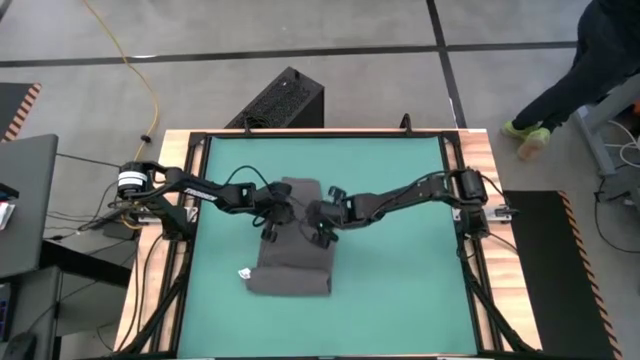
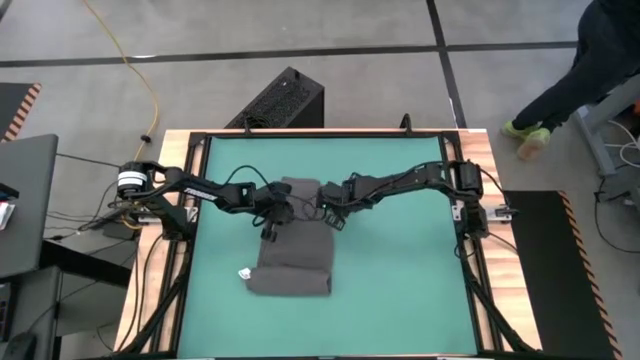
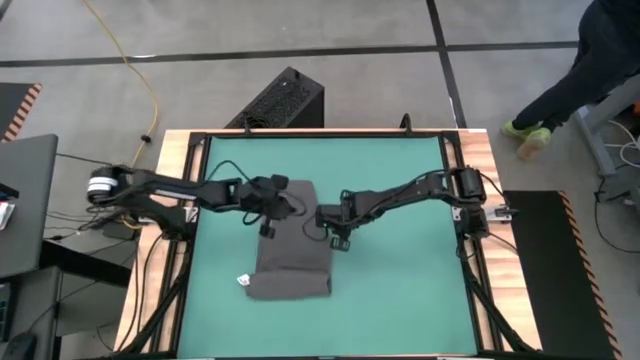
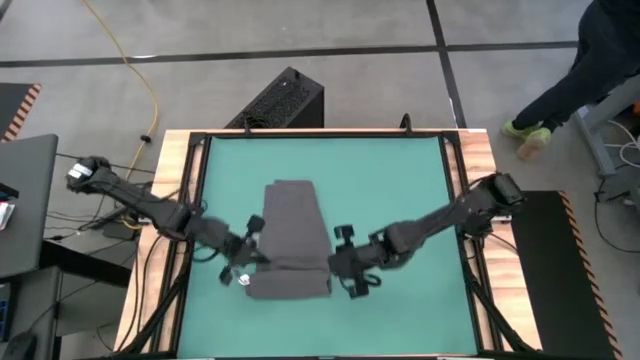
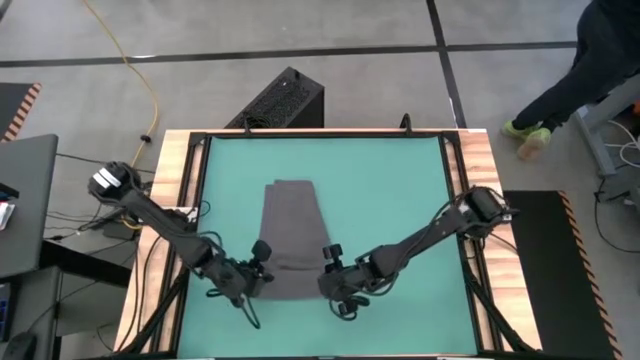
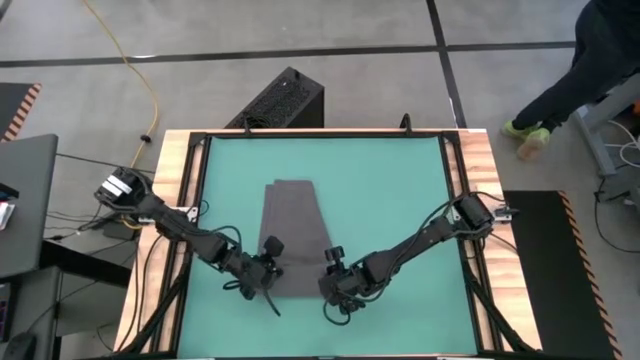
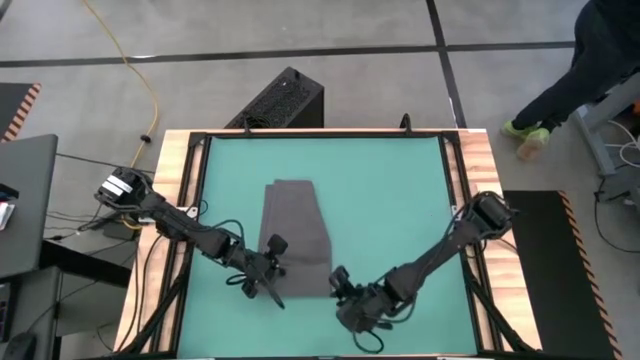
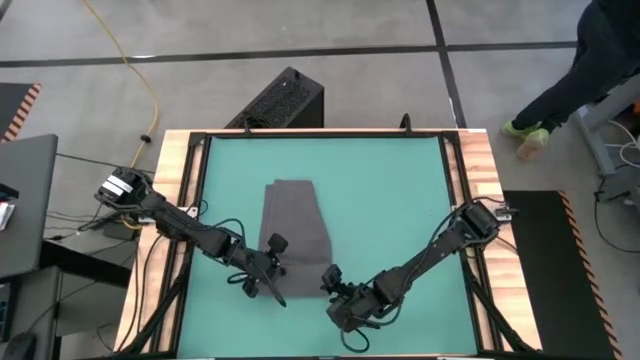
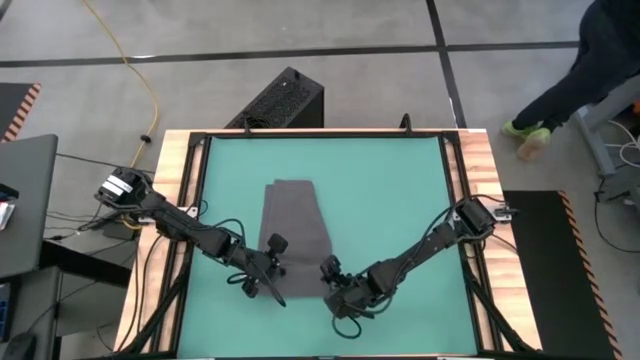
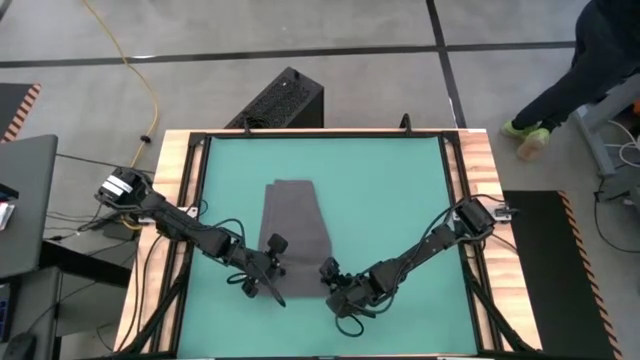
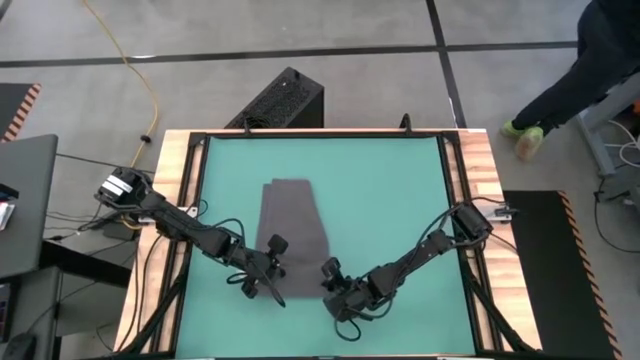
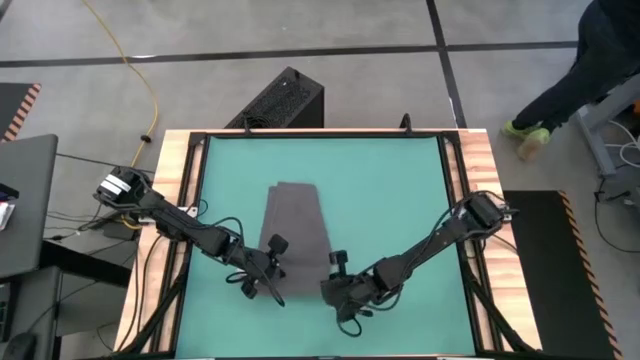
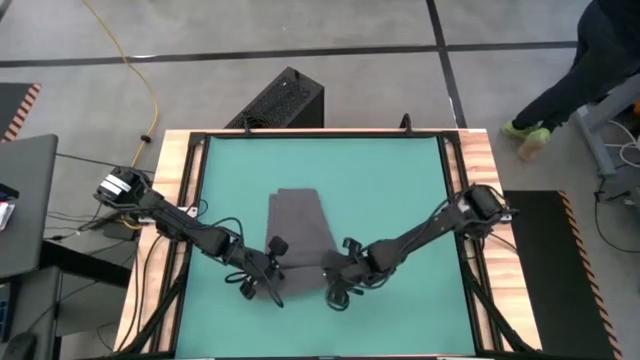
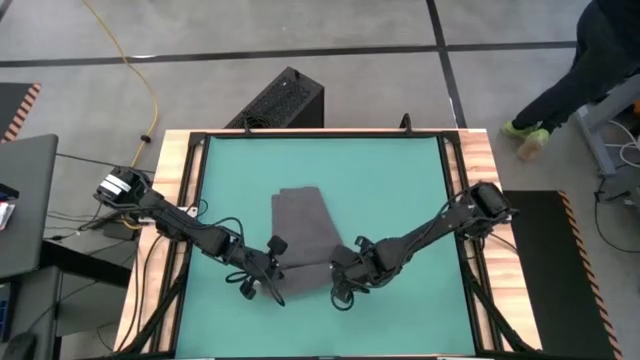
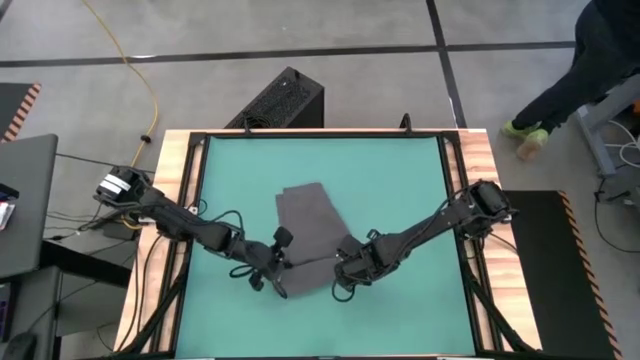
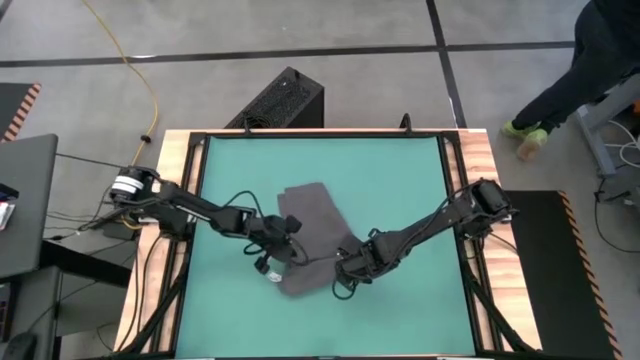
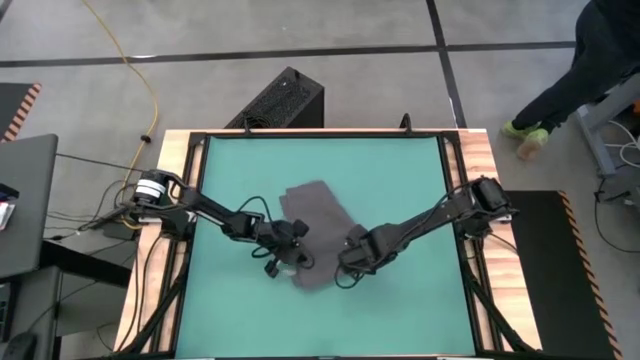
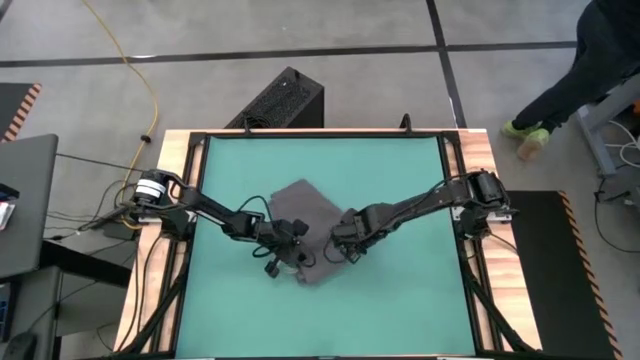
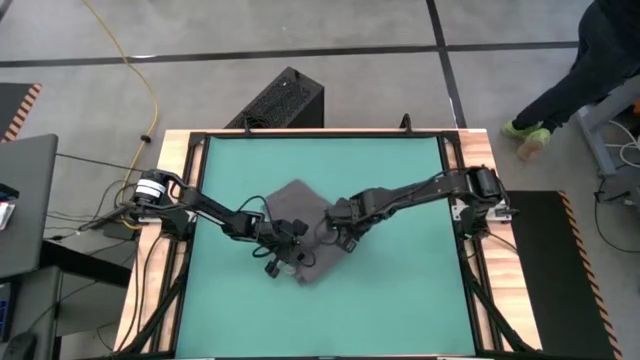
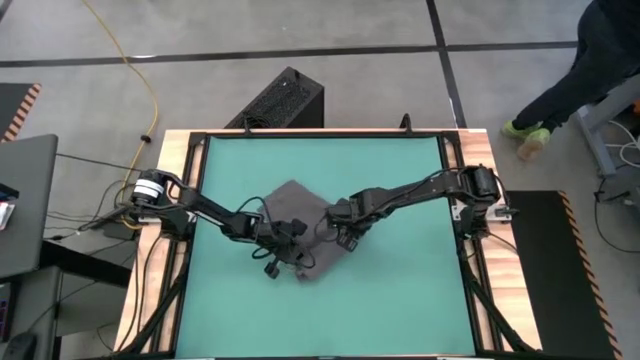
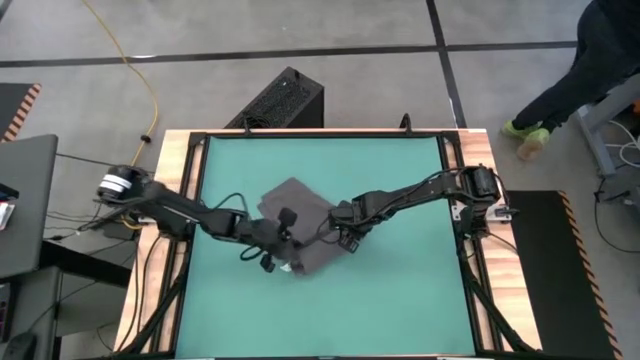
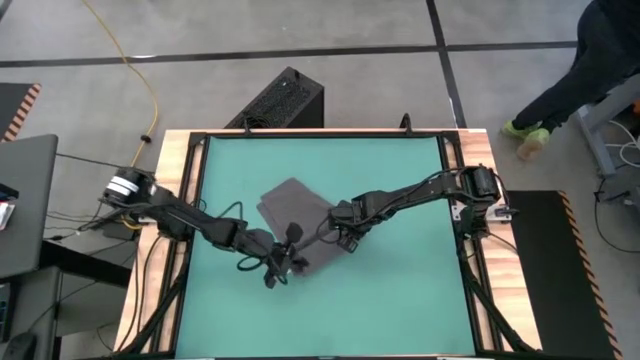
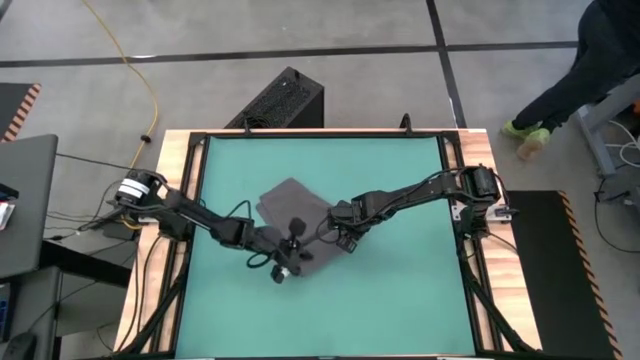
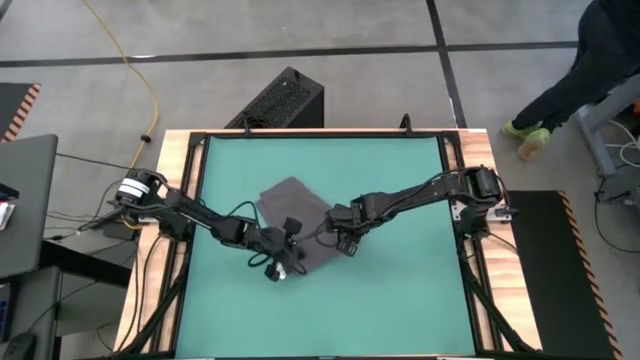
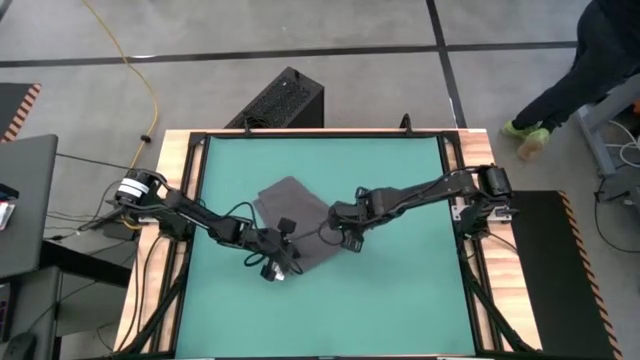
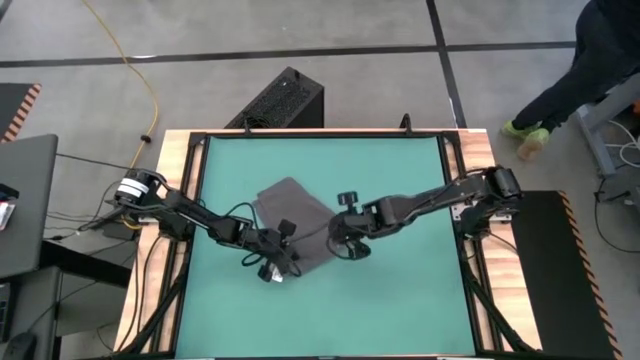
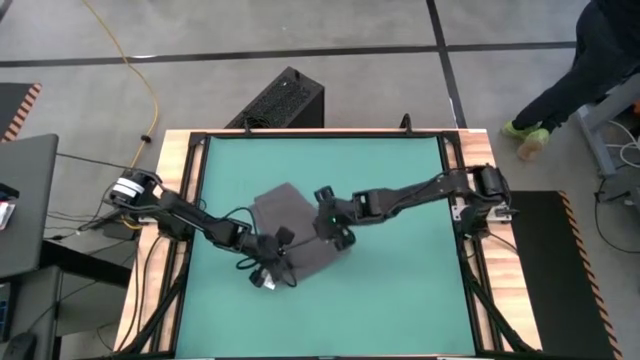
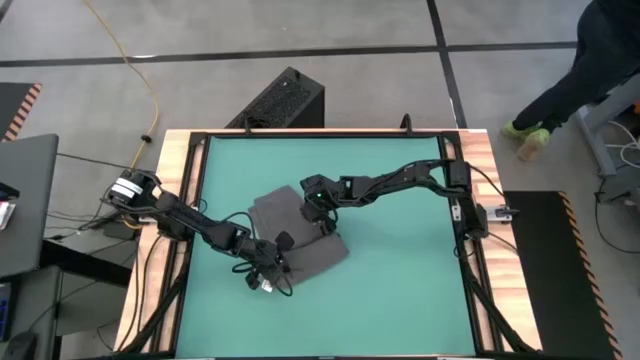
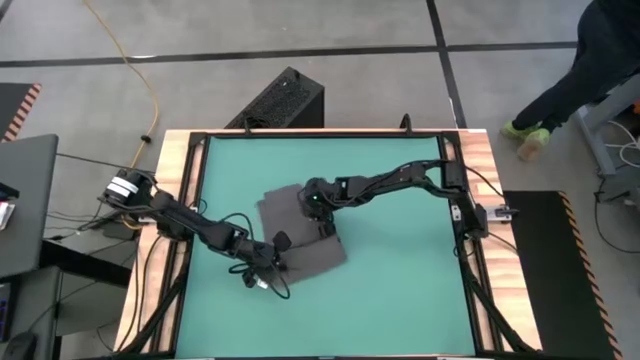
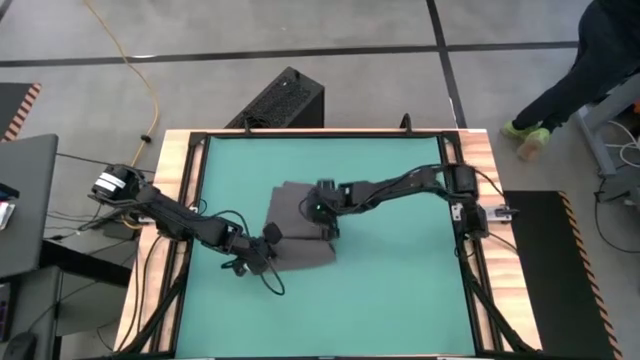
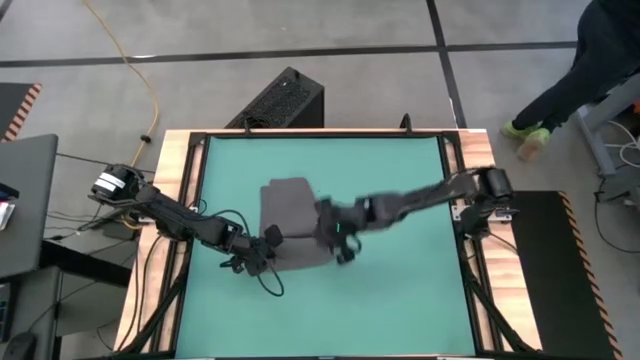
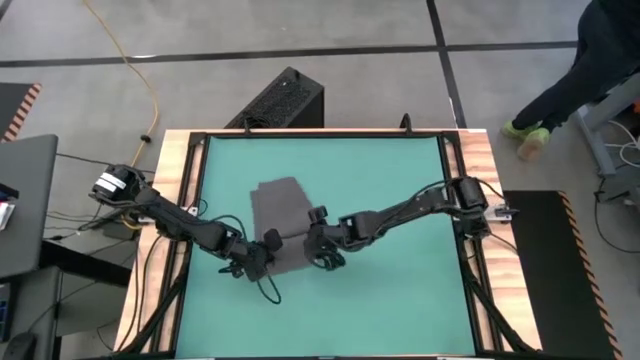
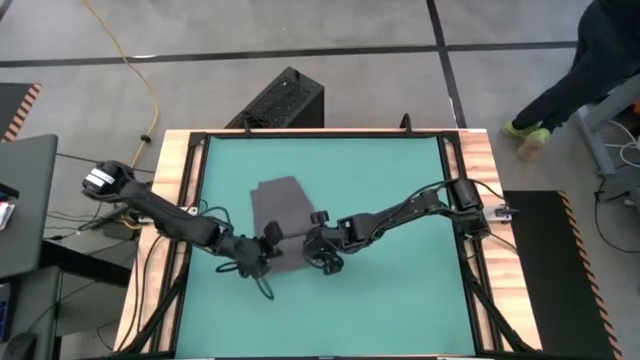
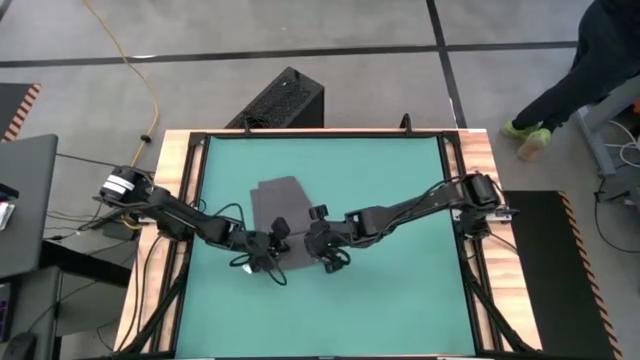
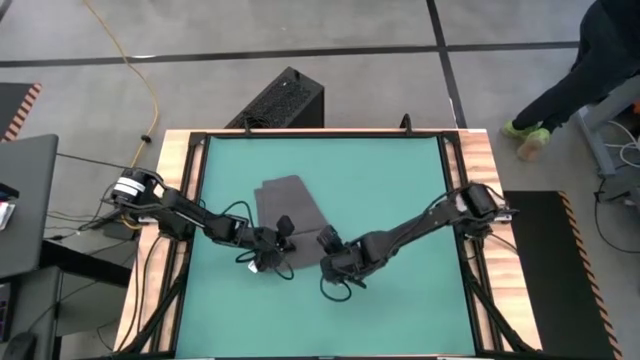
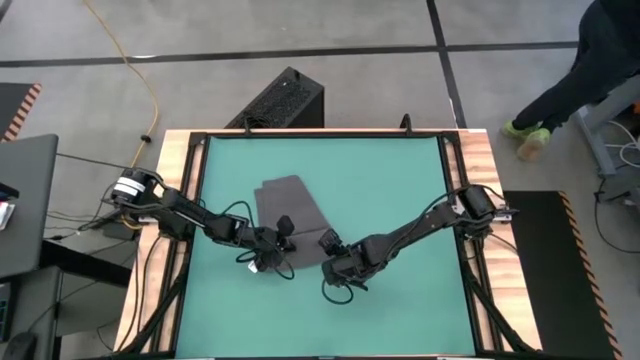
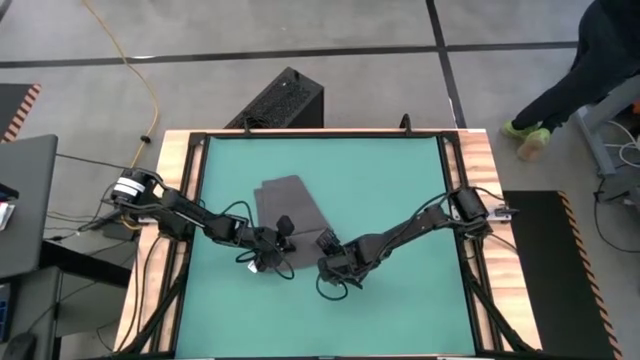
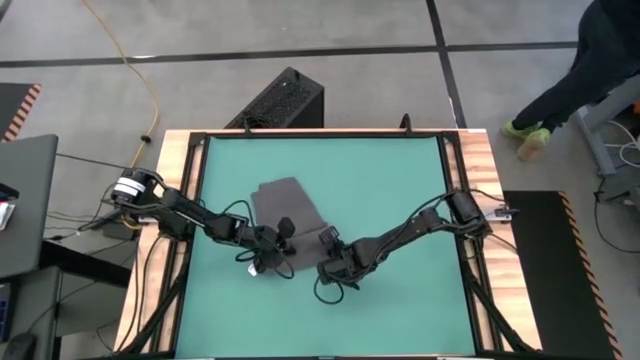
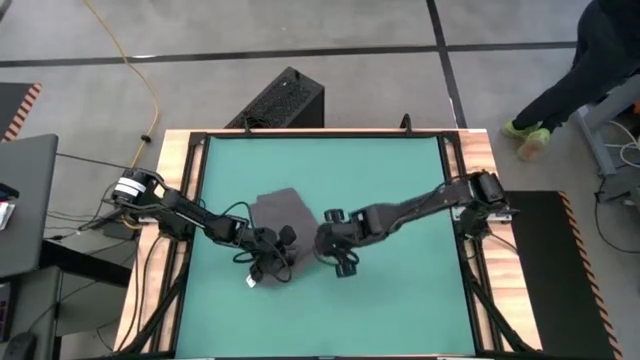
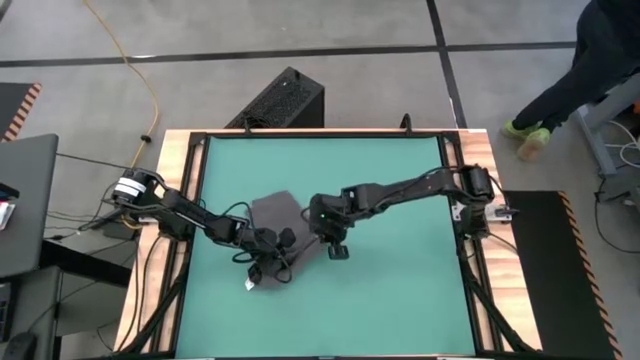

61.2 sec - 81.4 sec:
Task: Roll towel into tight, uniform cylinder
Roll the gray towel

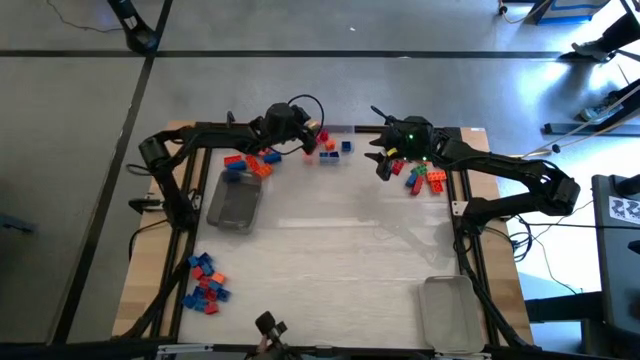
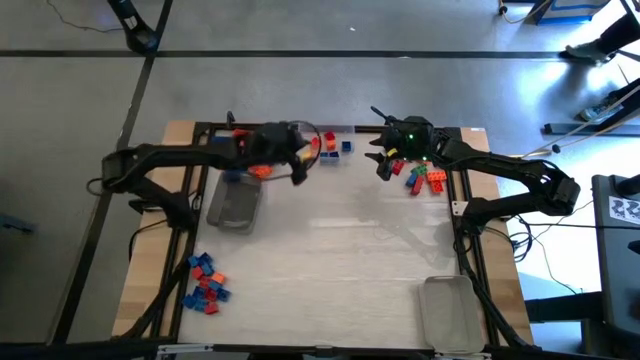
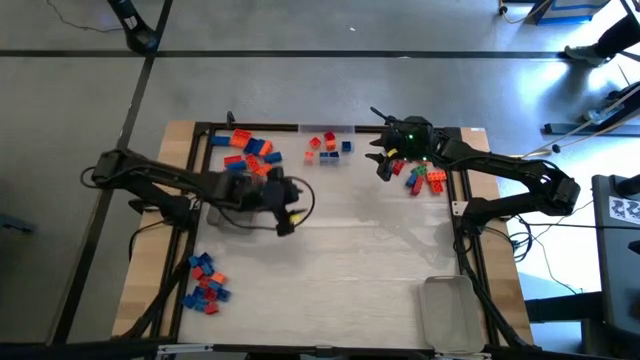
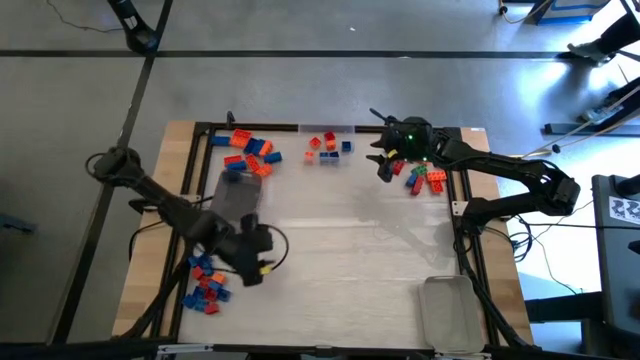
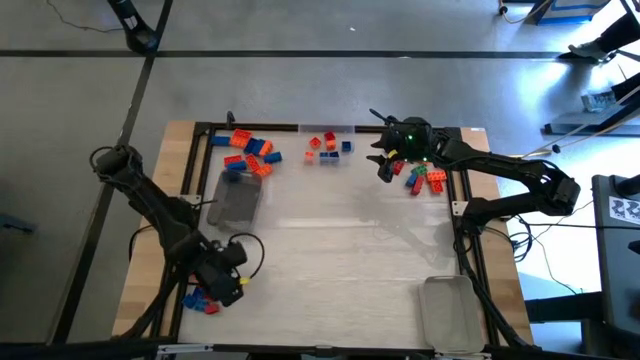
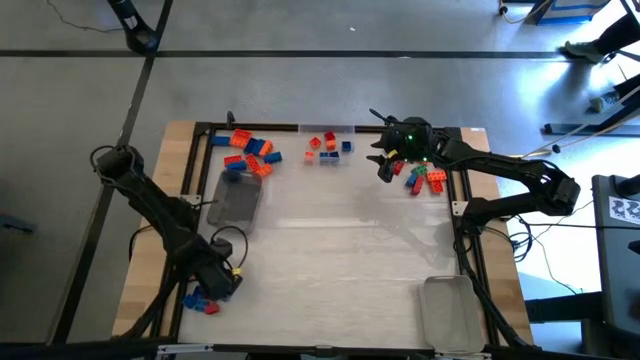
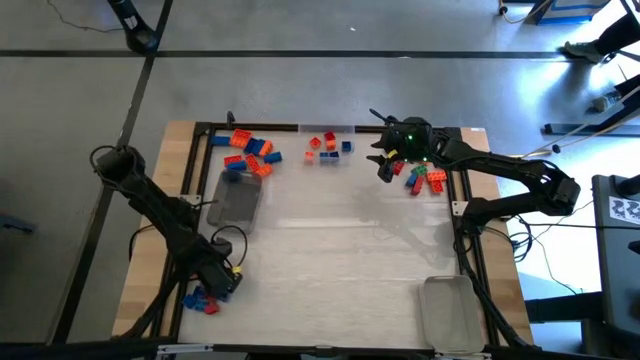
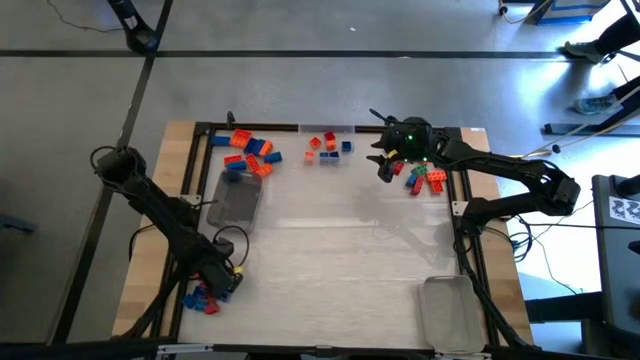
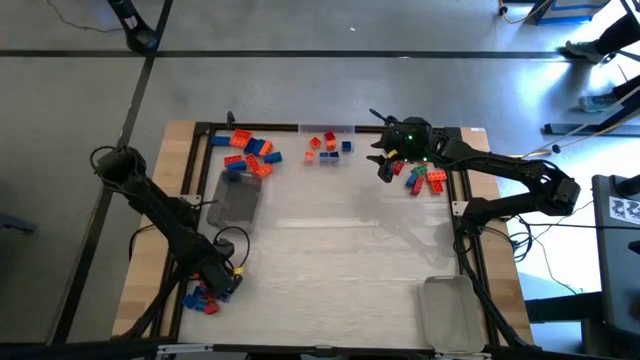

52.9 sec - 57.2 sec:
Task: Sort blocks by size
Put the orange 4 stud game piece into the transparent bin
